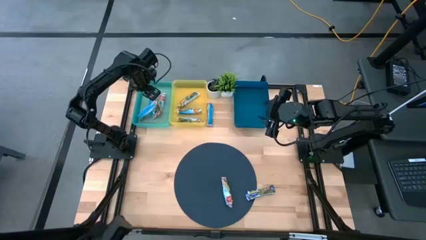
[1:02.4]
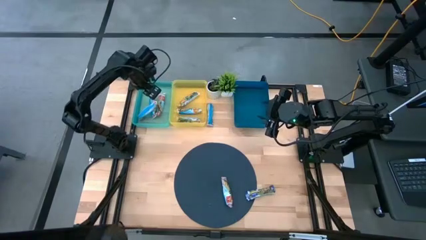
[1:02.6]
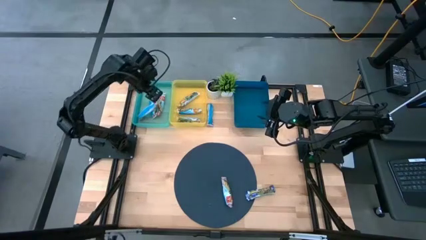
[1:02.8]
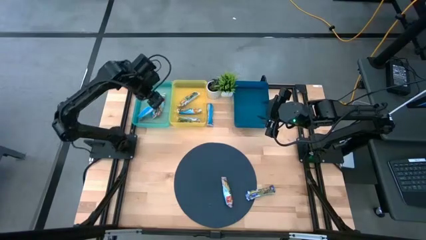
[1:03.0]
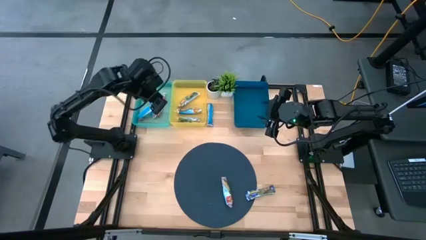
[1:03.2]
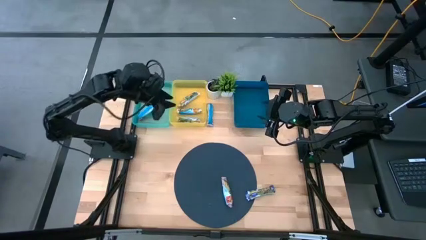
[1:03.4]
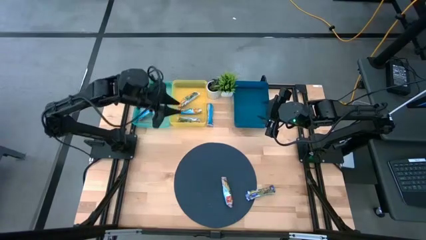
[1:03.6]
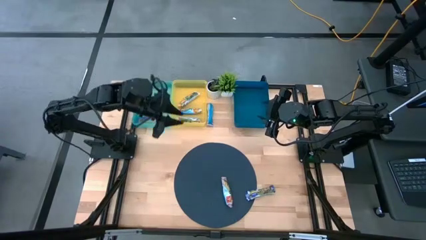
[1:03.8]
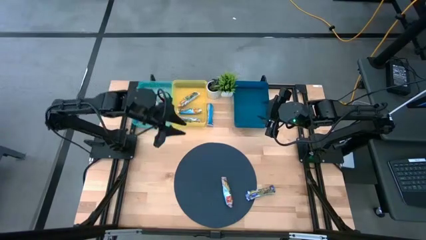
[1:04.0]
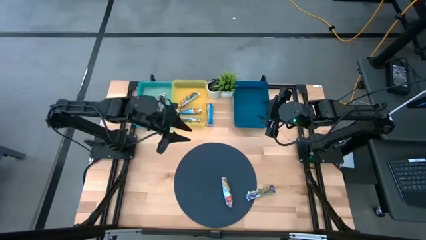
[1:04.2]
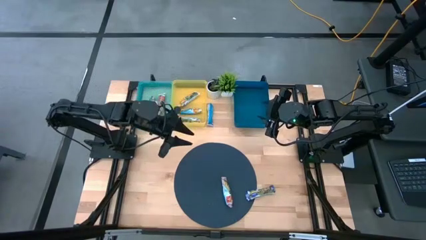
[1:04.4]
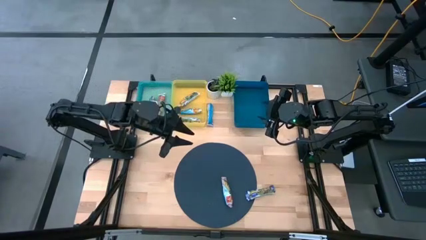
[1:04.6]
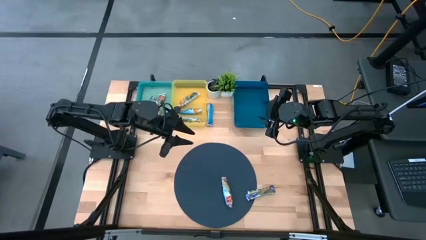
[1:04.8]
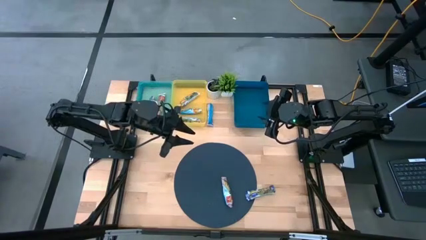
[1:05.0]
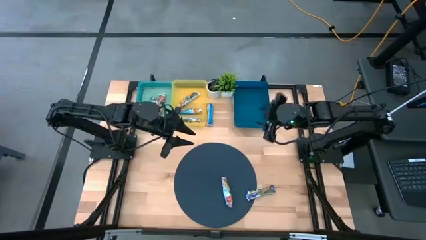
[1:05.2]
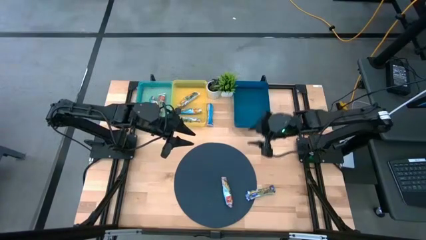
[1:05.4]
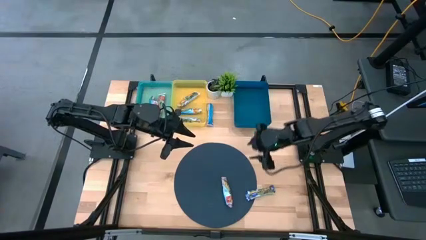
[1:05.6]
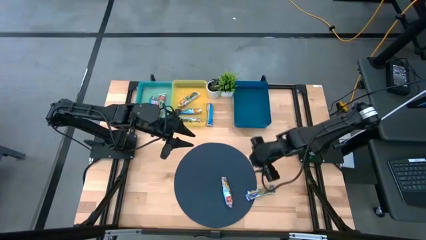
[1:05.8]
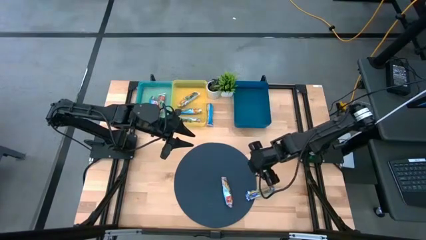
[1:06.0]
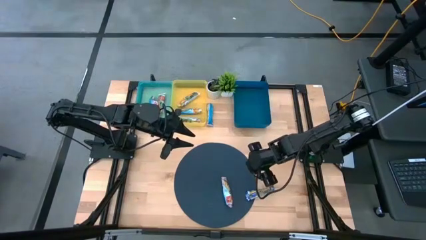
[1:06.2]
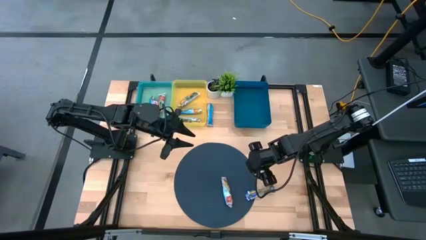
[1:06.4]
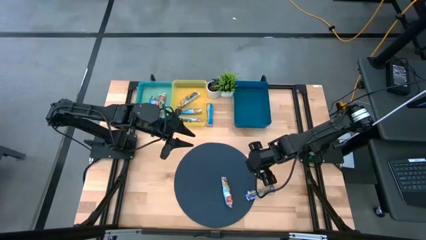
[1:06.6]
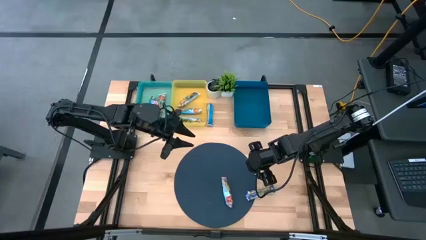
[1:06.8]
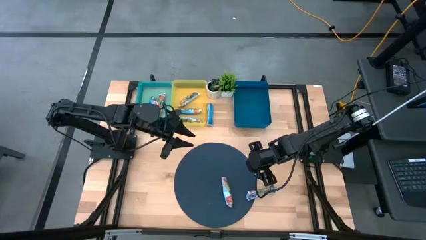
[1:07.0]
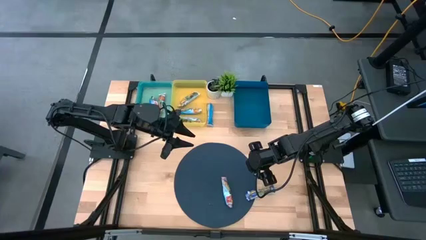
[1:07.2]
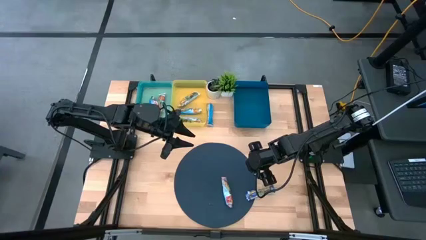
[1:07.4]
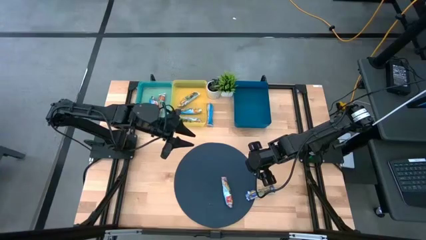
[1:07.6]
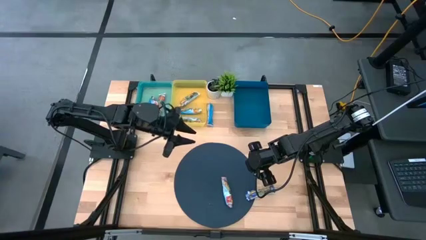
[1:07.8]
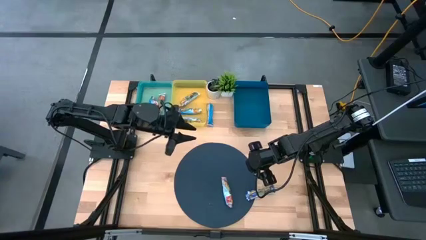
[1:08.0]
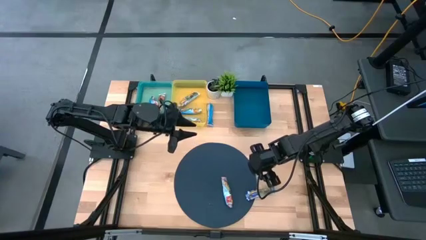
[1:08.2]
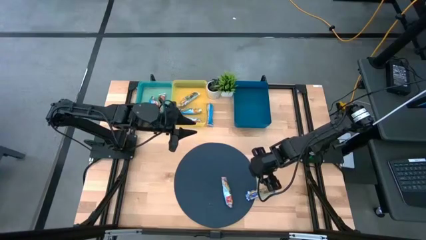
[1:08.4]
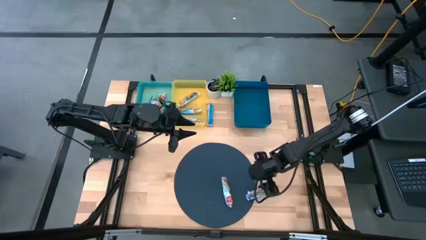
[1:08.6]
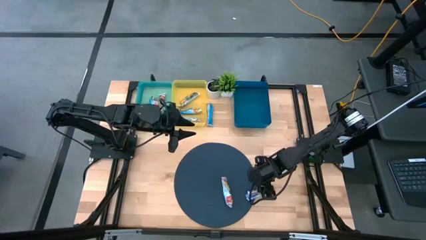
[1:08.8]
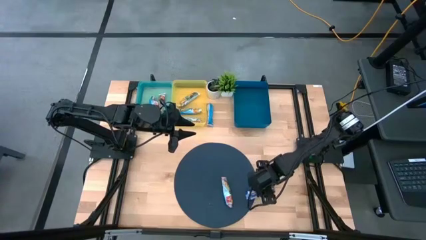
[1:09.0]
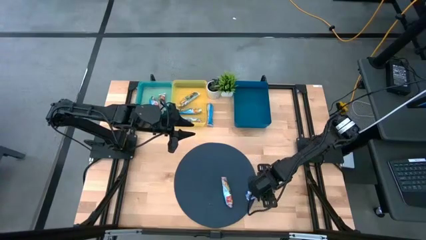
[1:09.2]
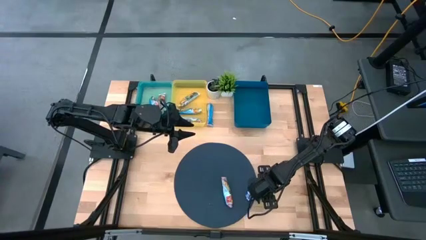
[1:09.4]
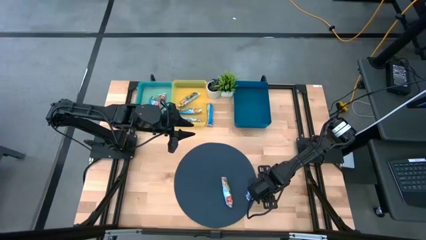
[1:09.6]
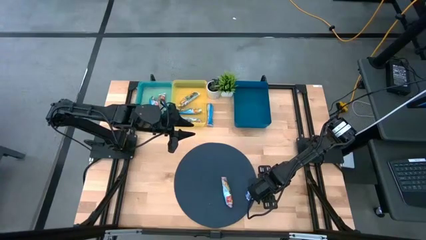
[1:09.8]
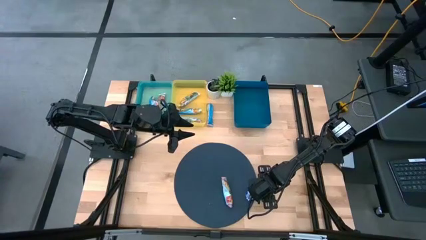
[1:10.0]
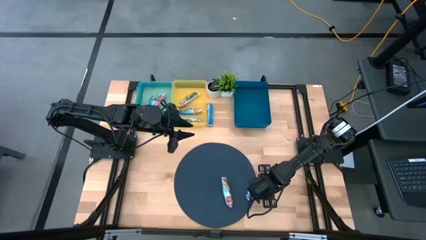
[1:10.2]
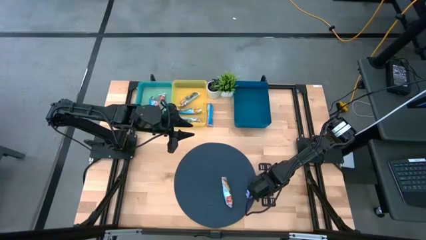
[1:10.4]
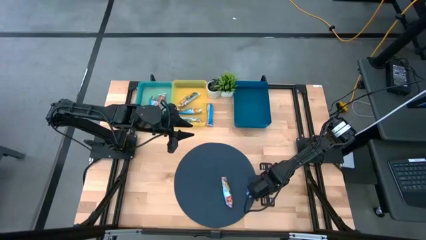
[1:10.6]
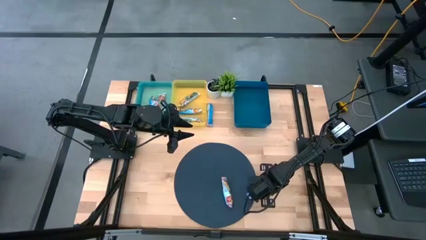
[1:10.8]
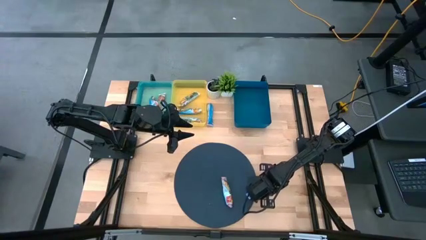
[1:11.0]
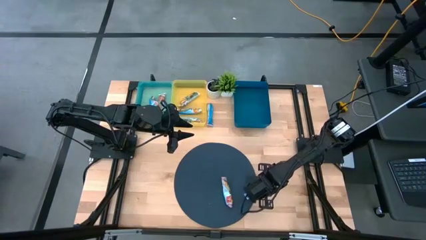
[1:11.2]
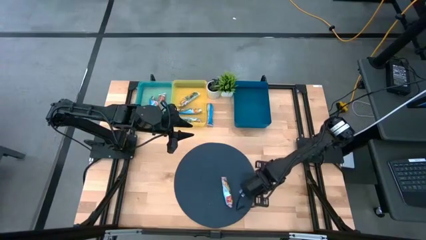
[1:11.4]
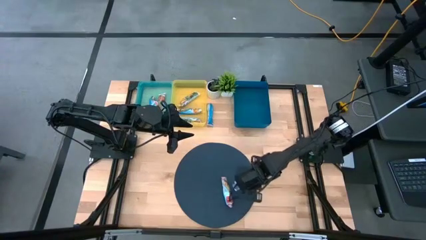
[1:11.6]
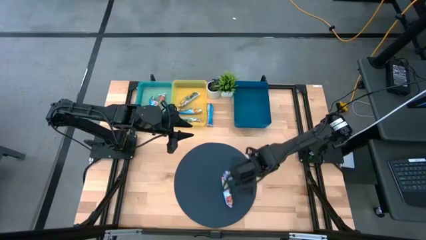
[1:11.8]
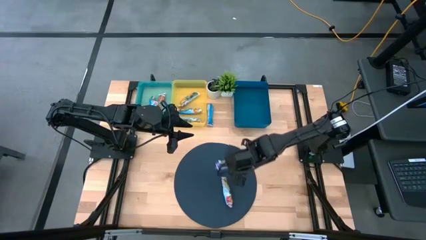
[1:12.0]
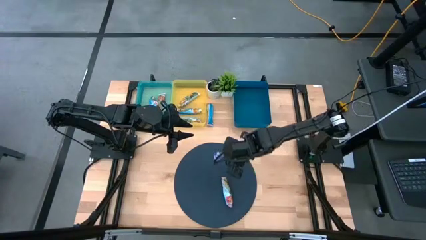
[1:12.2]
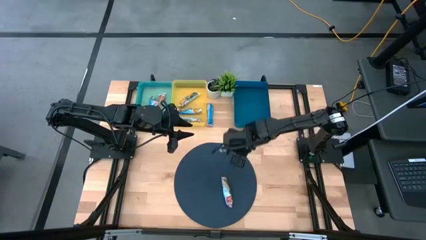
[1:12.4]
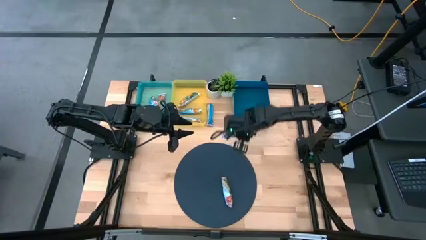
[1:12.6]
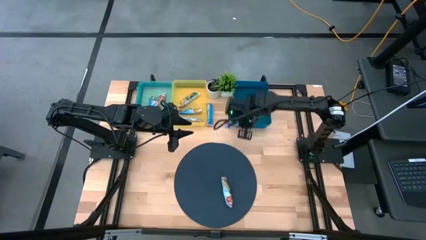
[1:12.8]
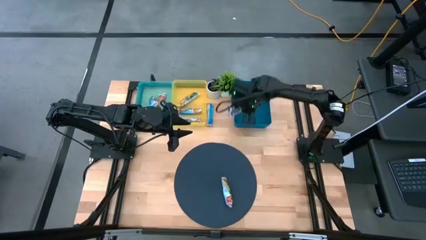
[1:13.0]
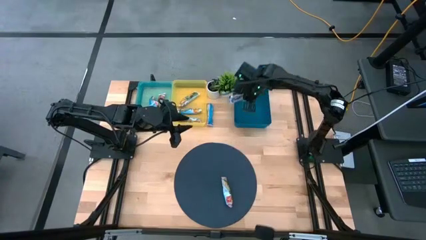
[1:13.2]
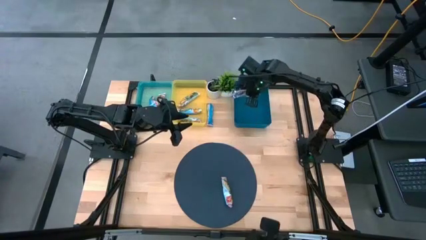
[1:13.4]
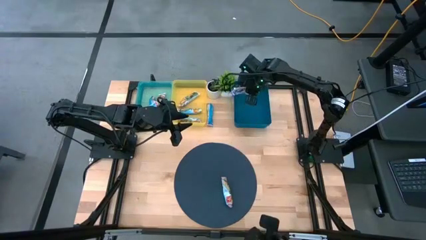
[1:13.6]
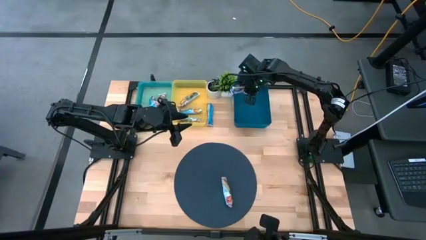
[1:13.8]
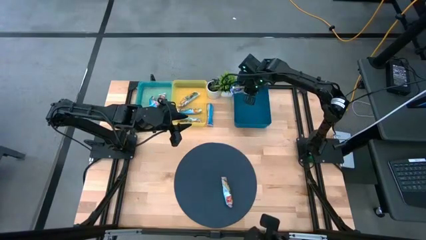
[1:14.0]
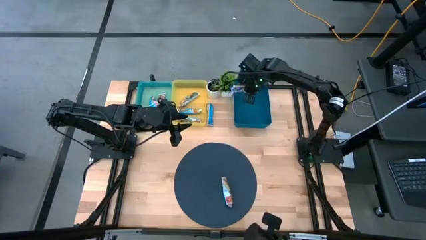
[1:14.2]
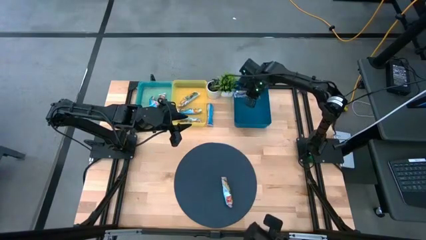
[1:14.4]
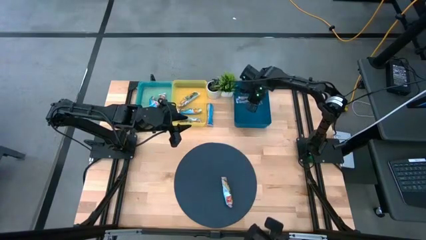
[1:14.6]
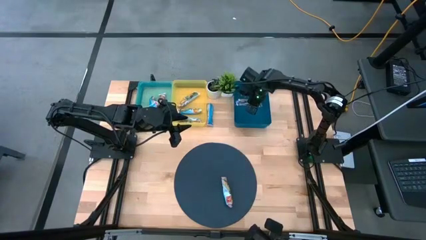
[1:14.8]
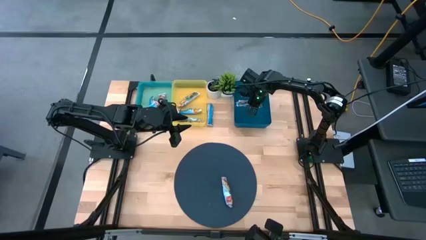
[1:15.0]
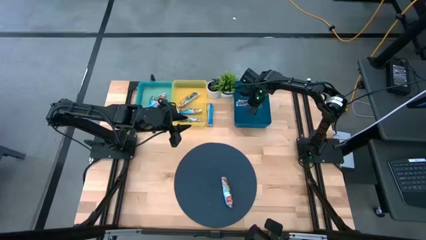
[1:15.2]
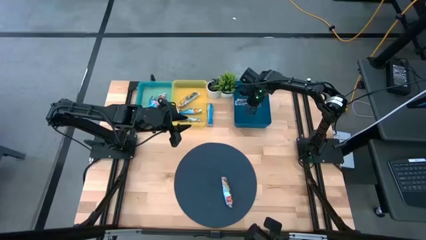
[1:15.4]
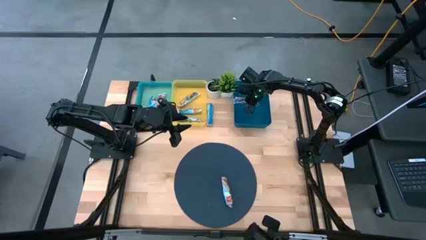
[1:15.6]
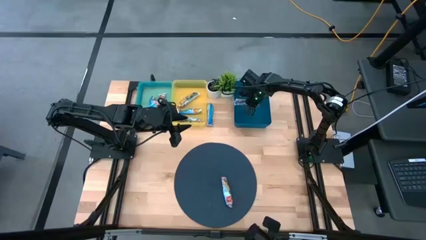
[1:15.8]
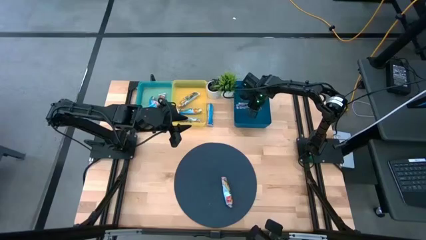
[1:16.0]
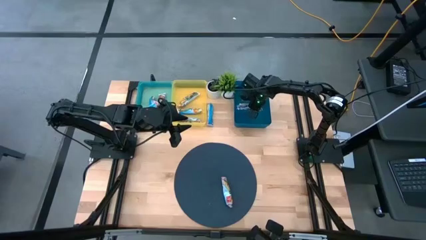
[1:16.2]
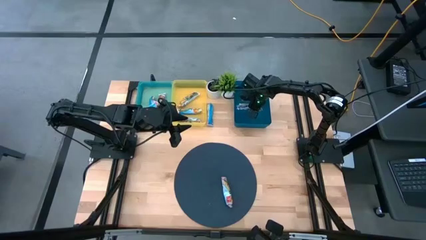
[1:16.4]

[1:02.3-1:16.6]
Task: Pick and place Granola Bars by type
Put the blue granola bar into the blue bin

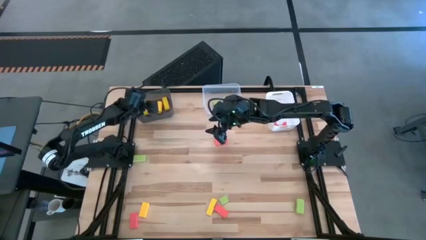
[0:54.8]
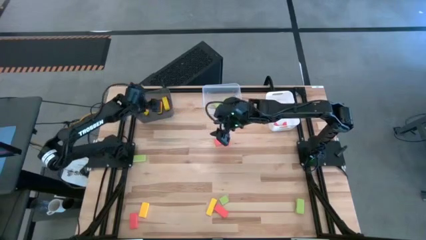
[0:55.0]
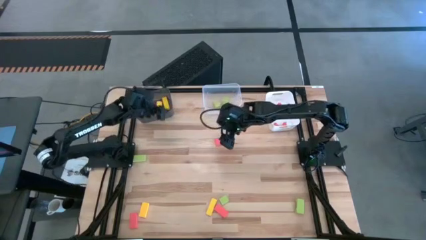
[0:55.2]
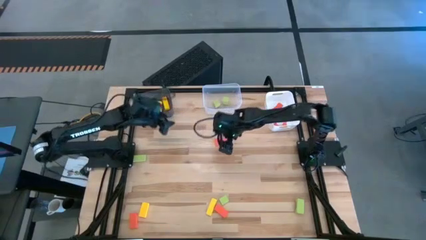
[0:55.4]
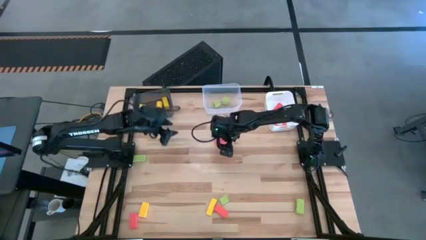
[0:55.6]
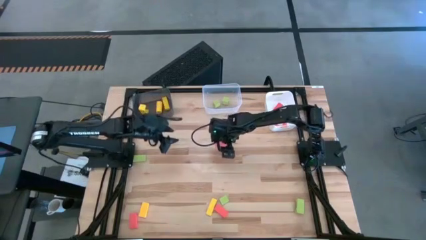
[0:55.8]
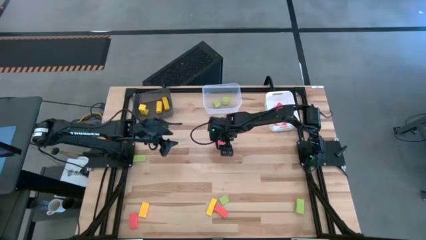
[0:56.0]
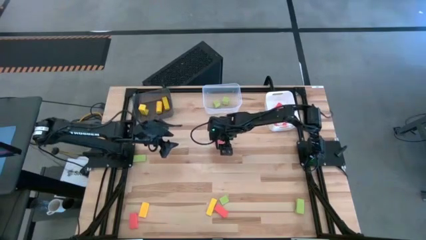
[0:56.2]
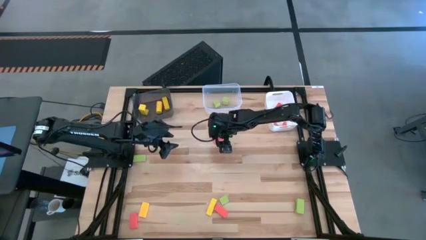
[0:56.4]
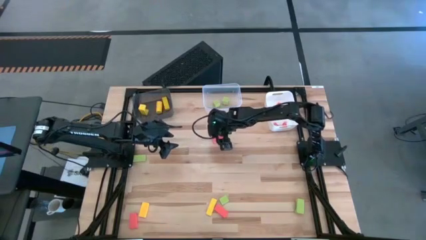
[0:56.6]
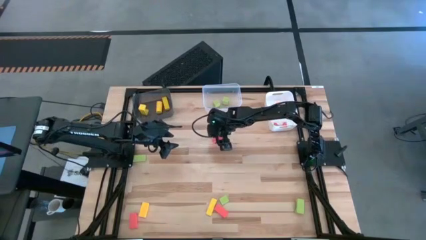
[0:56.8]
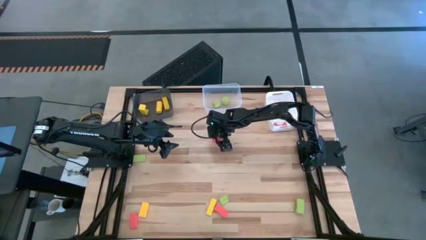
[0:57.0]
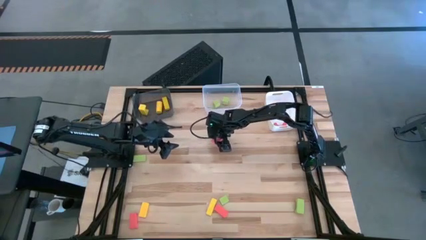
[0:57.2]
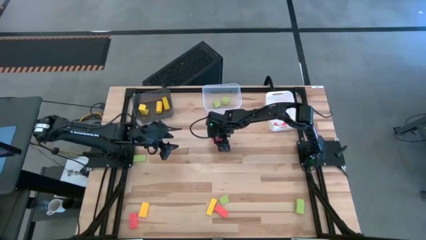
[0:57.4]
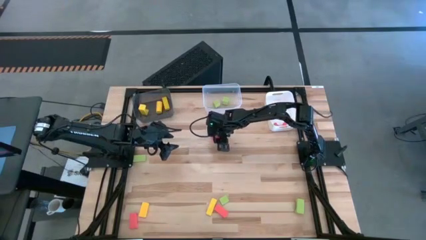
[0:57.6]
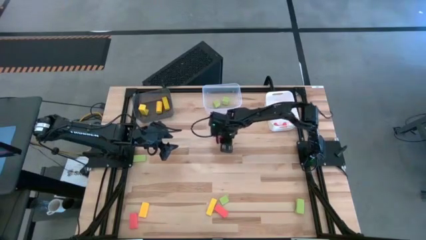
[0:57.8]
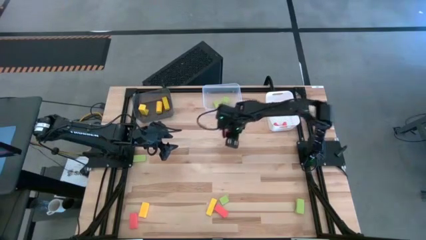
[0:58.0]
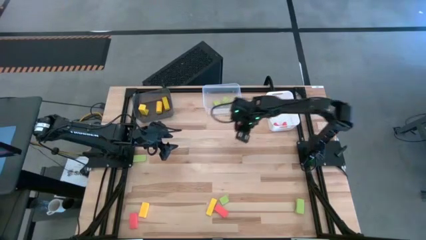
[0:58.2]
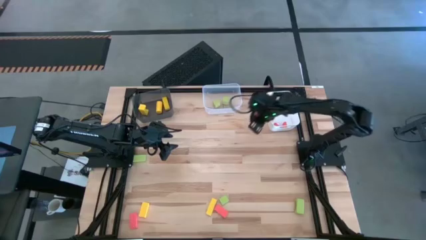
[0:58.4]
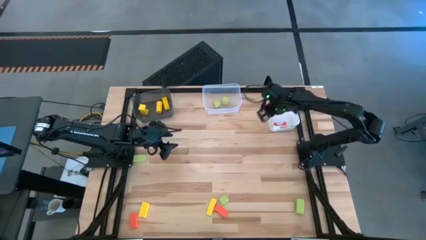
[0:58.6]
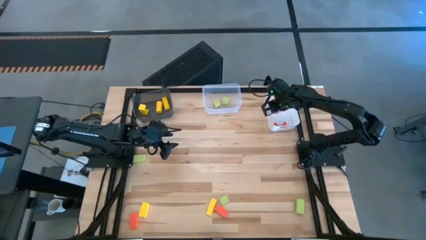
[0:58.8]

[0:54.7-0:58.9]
Task: Sort & place blocks by color
Put the orange block into the white bin
